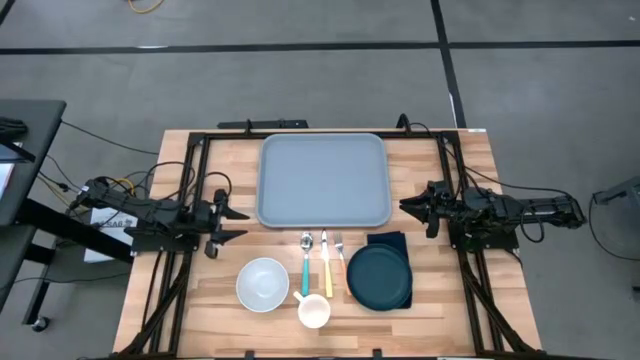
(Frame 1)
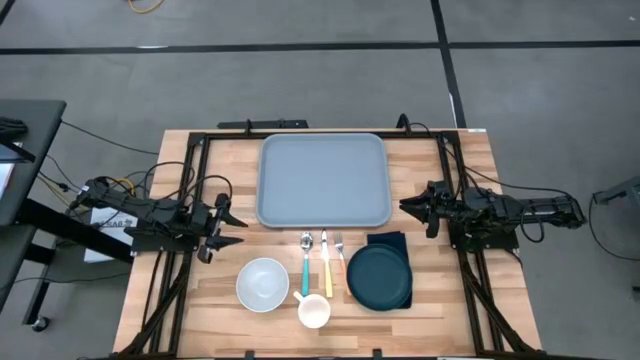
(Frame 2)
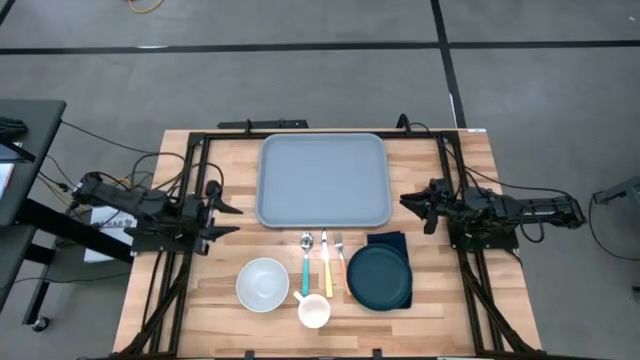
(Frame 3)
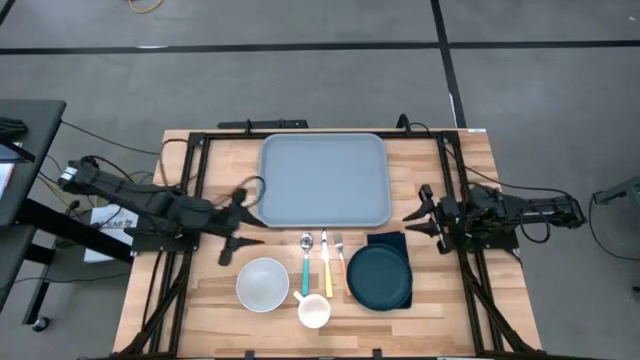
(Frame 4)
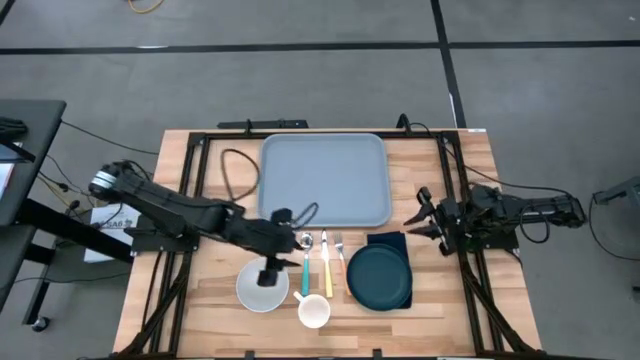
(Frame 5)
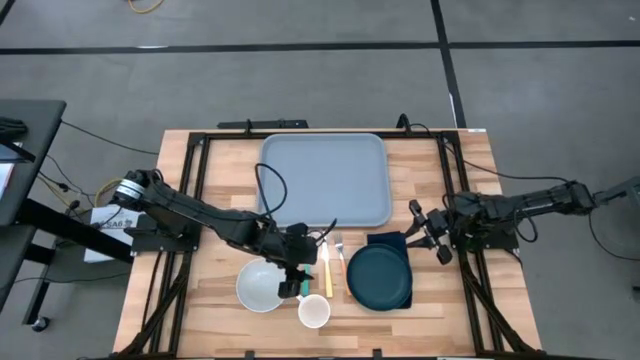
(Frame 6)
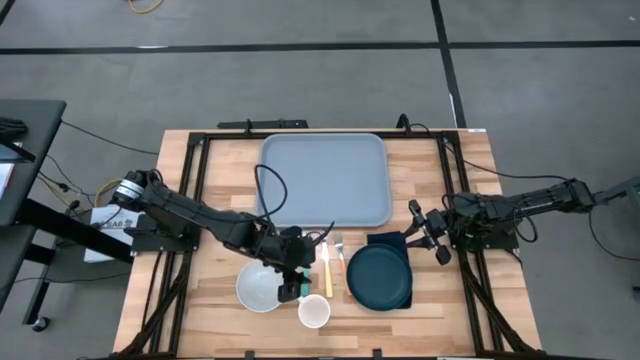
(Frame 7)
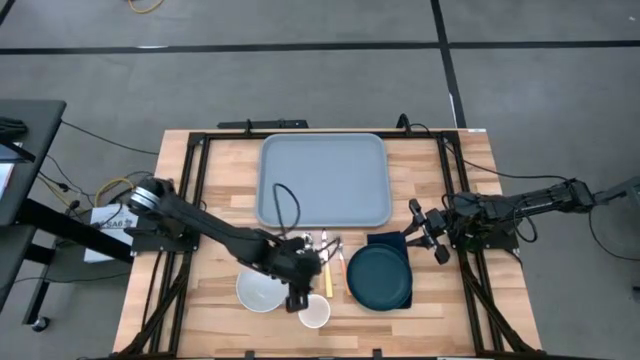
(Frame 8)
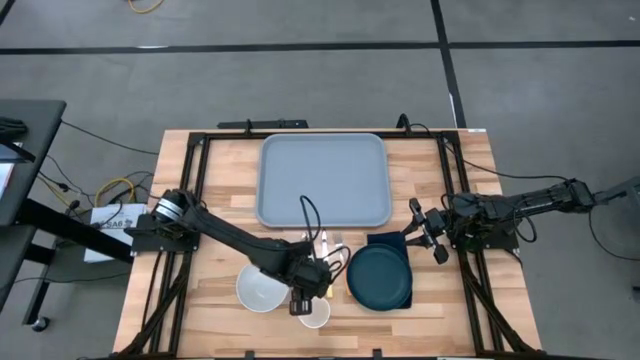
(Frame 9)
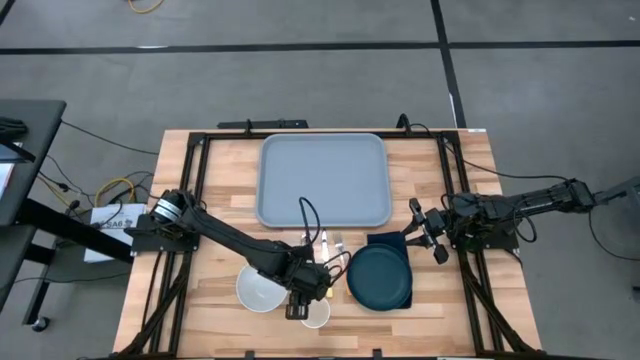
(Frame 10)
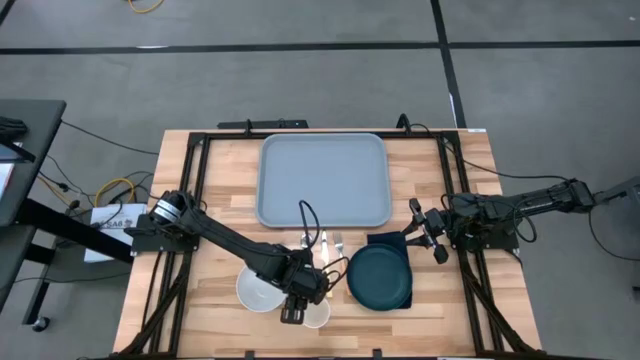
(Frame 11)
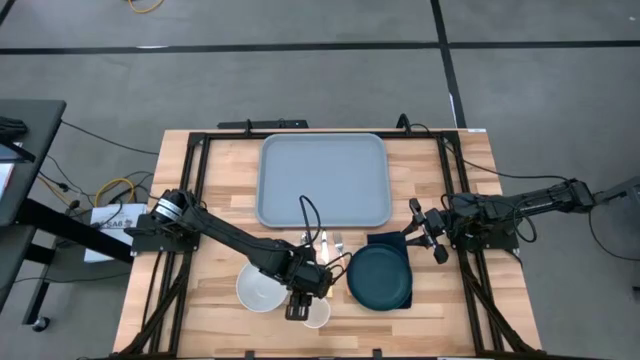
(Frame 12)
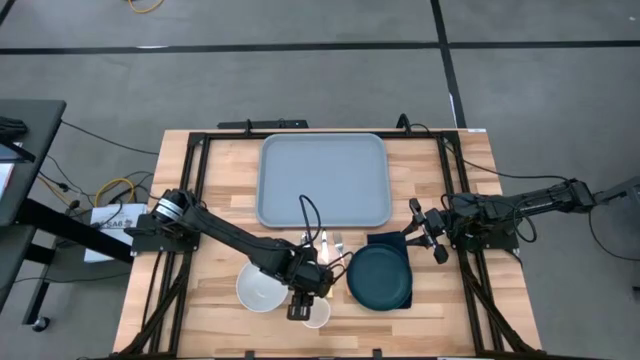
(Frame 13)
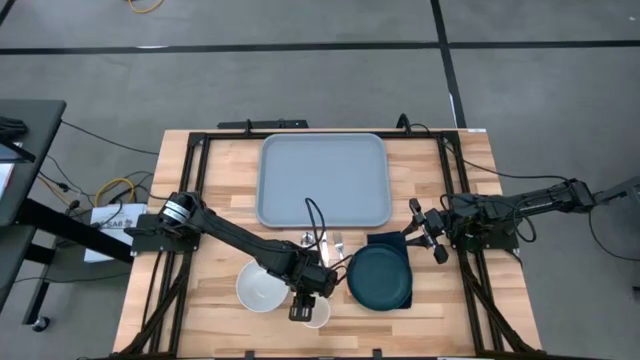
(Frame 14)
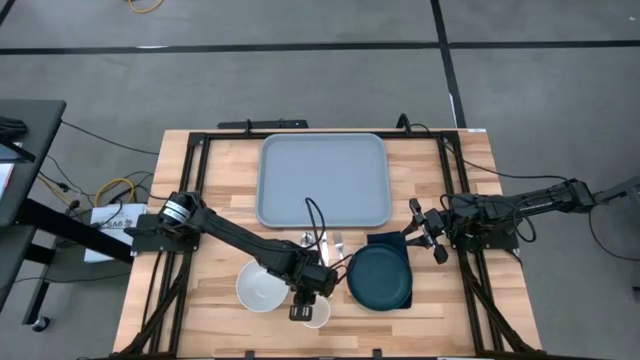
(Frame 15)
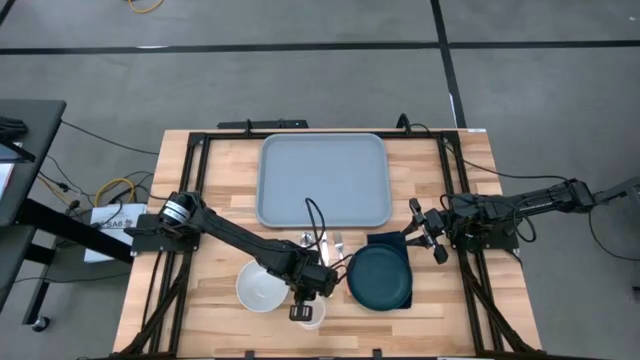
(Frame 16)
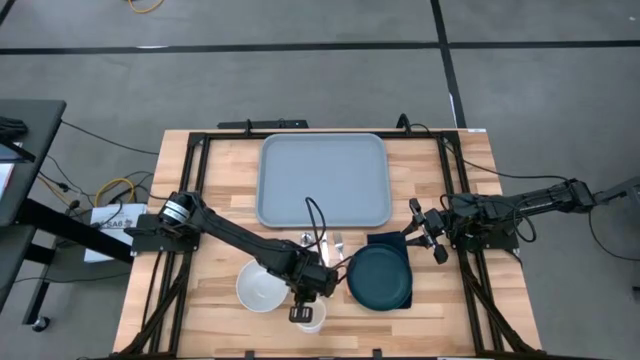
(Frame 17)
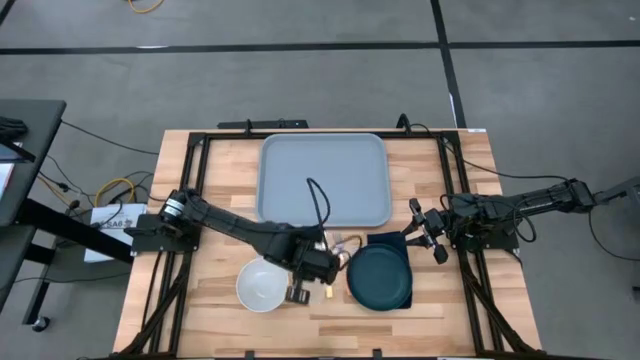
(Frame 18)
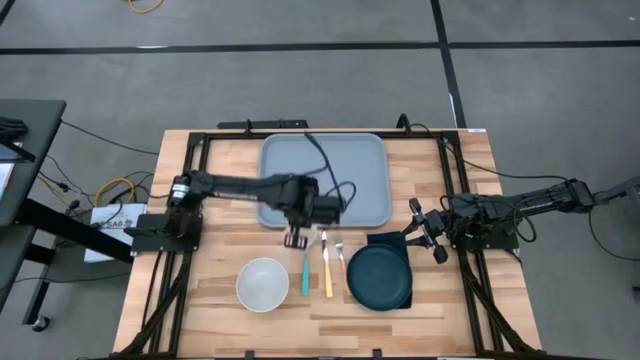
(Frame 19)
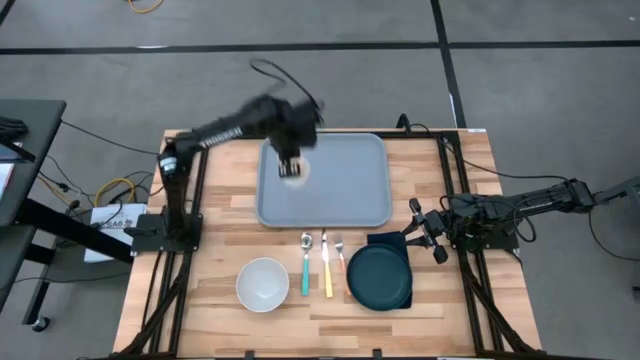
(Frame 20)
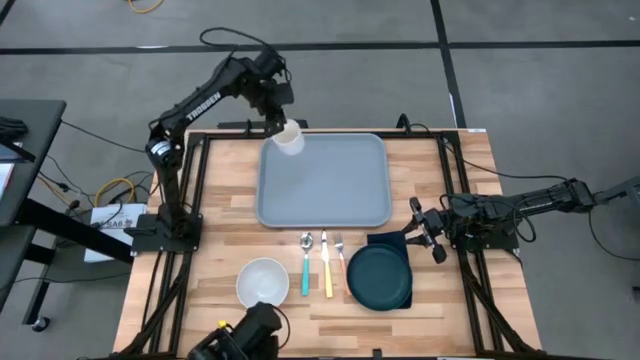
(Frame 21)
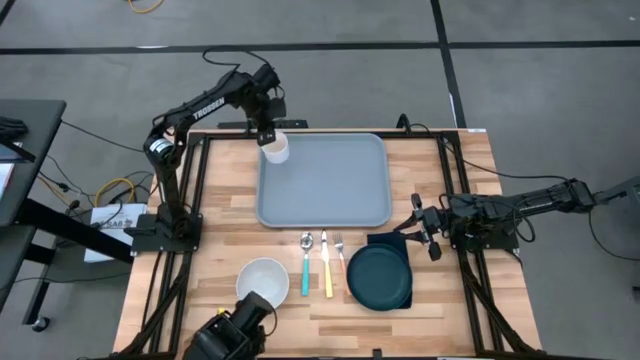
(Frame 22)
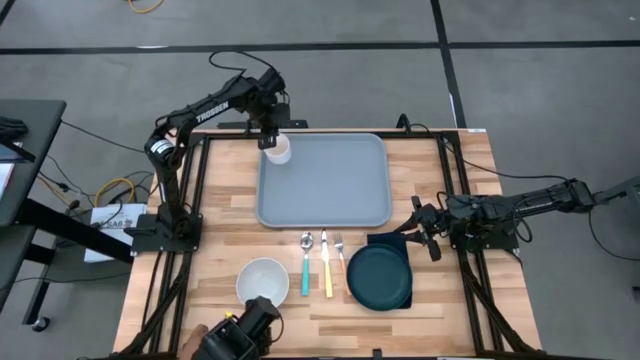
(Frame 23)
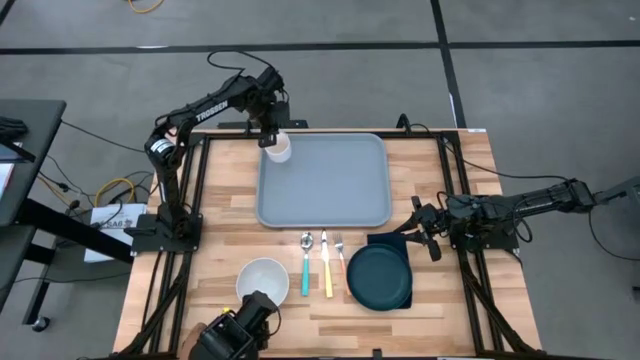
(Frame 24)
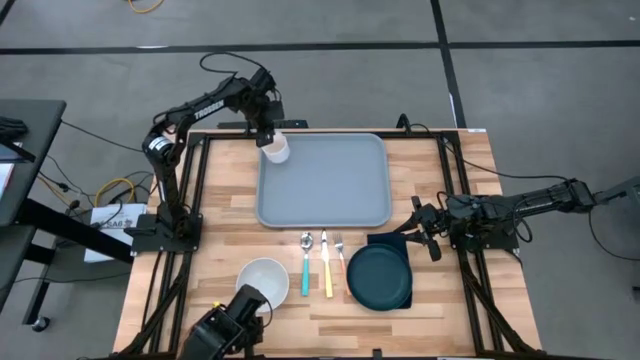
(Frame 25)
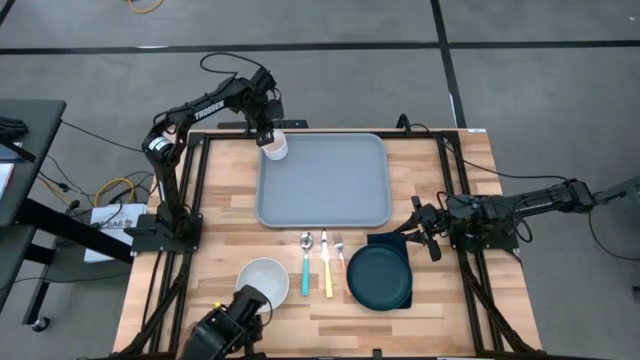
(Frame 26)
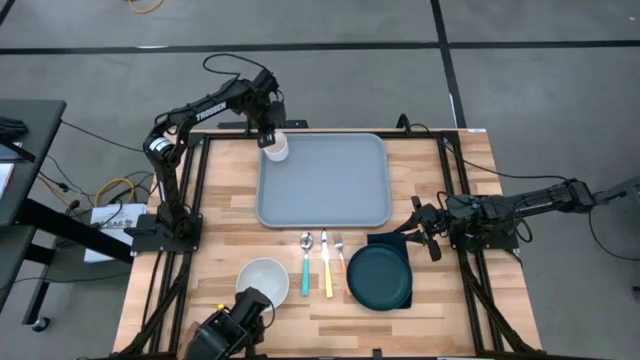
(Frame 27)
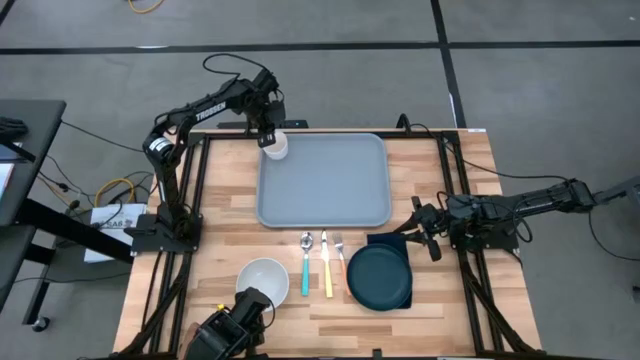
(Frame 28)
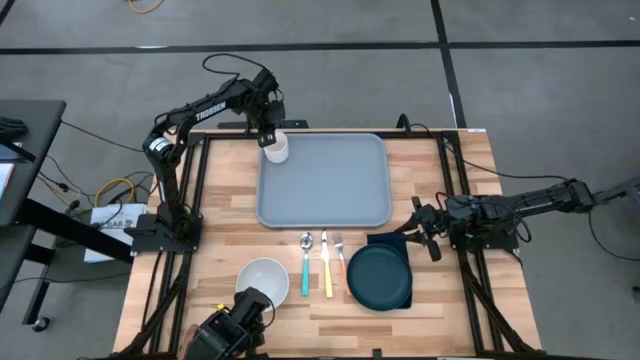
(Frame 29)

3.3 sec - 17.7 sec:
Task: Set up tray
Put the white mug on the top left of the gray tray

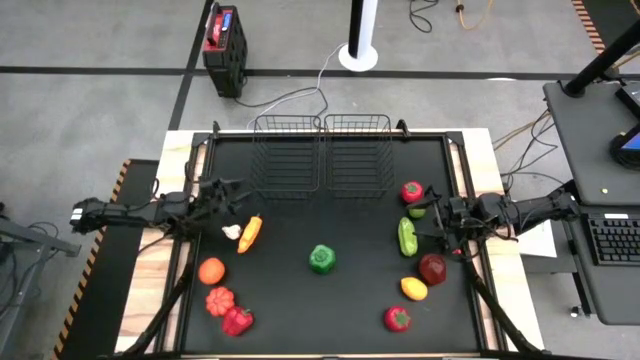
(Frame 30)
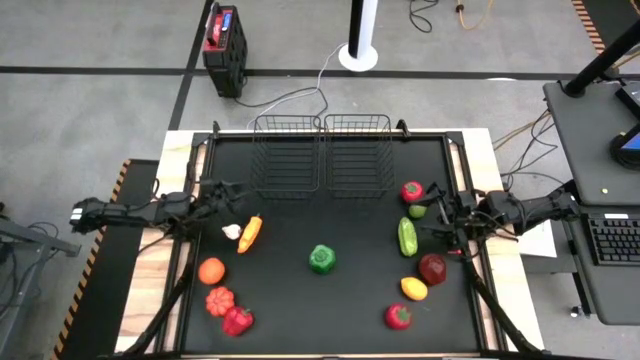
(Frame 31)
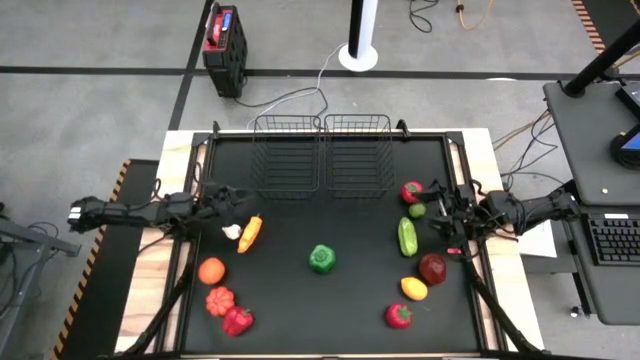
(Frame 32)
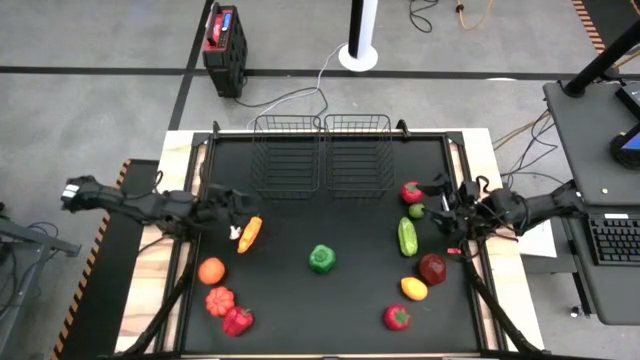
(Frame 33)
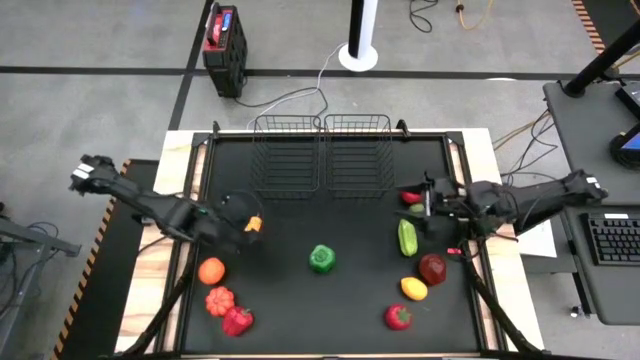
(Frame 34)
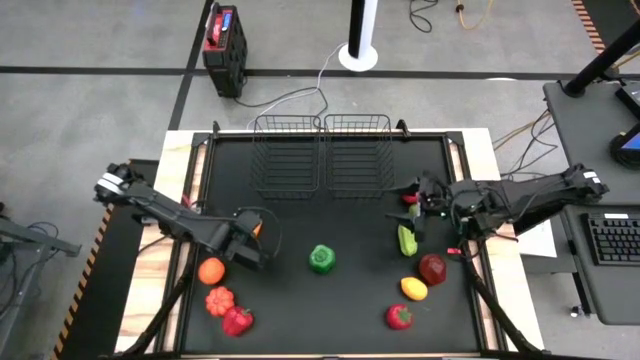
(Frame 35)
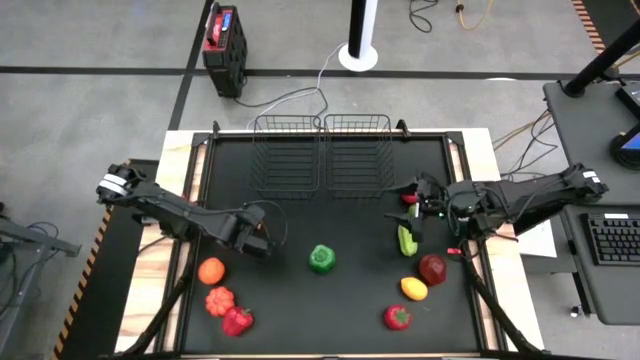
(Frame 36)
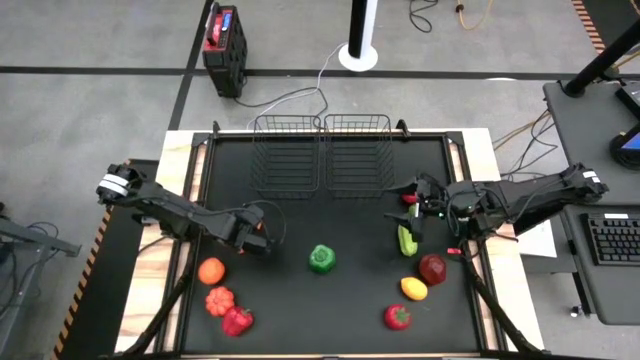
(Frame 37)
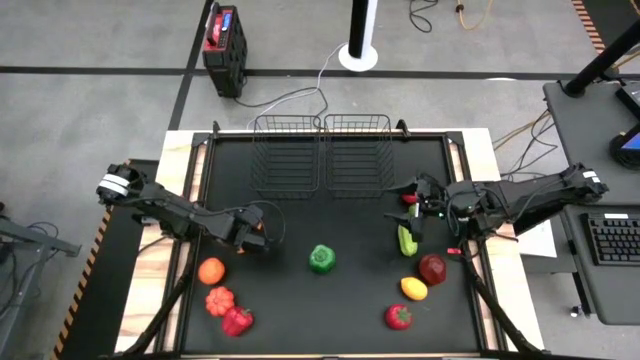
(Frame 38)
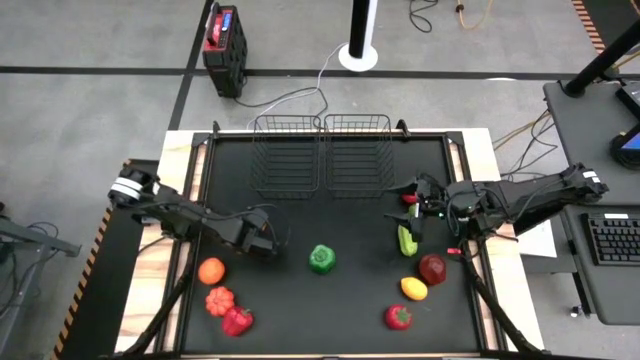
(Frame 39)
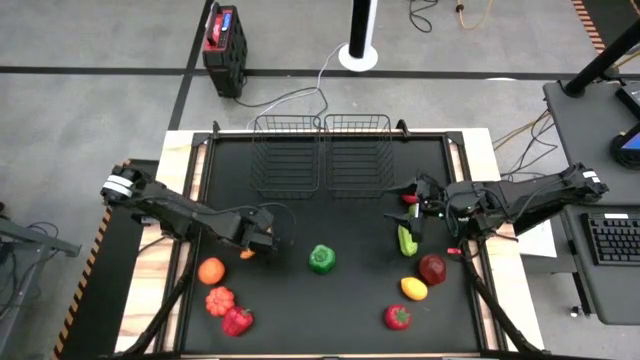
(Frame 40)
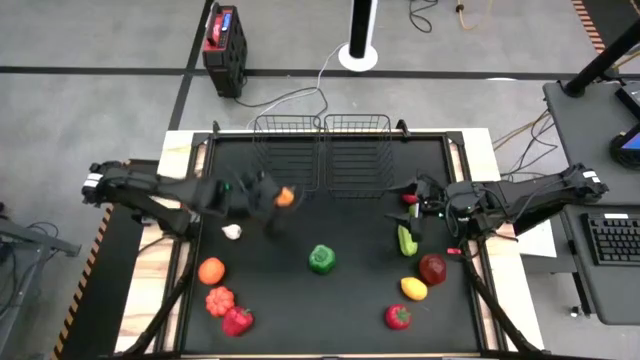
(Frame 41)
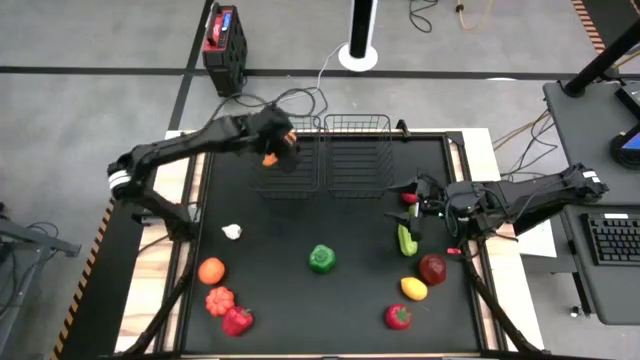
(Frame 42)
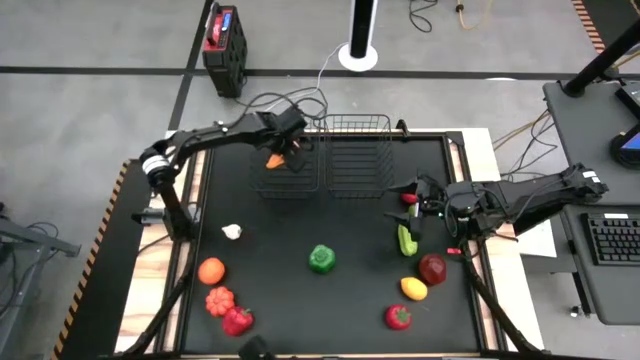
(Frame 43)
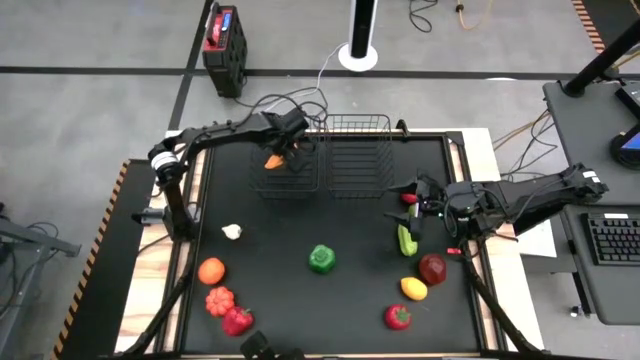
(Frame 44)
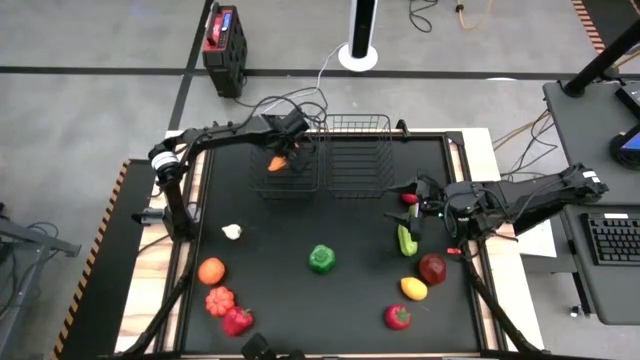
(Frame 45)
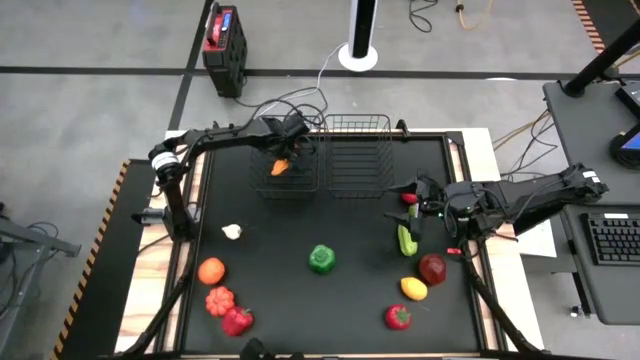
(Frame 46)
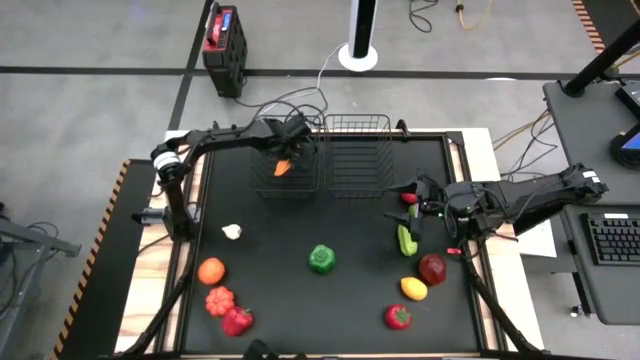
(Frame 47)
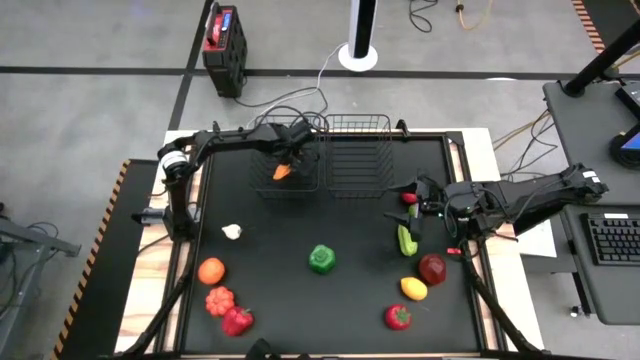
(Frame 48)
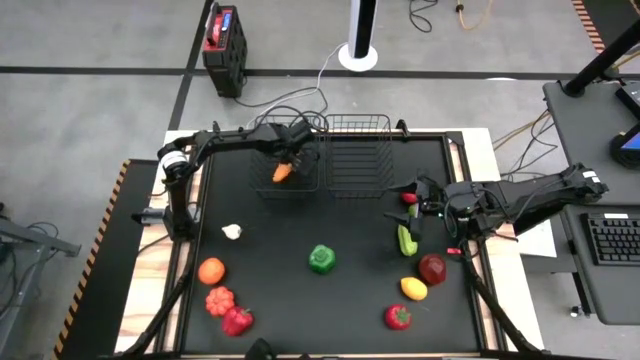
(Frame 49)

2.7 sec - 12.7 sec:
Task: Sort produce into baskets
Put the yellow chili pepper into the left wire basket
